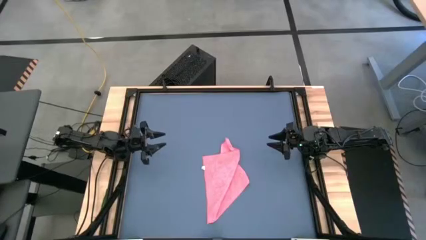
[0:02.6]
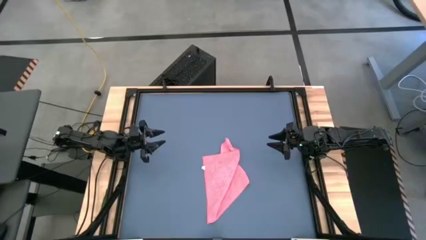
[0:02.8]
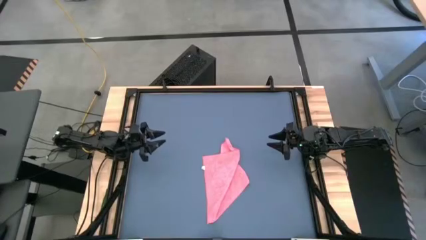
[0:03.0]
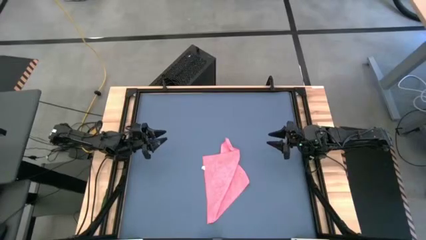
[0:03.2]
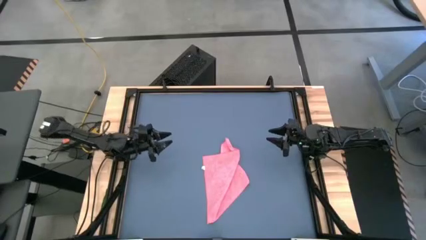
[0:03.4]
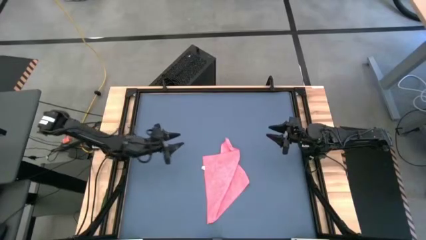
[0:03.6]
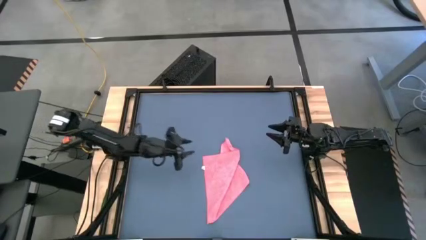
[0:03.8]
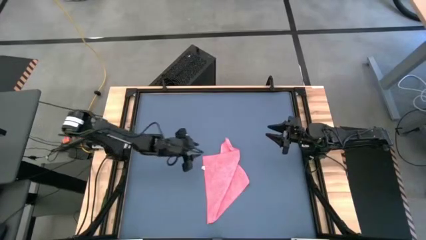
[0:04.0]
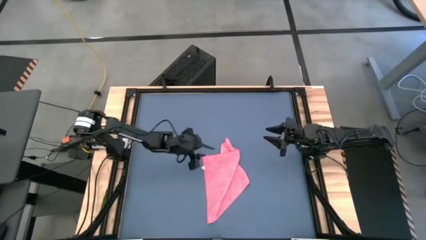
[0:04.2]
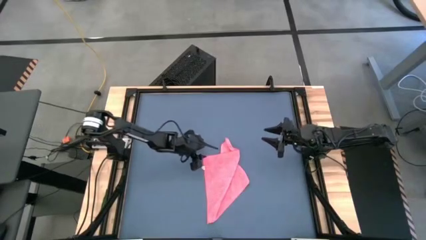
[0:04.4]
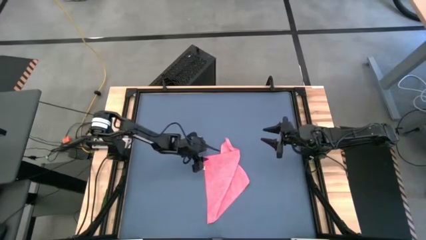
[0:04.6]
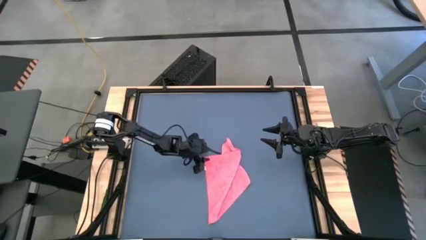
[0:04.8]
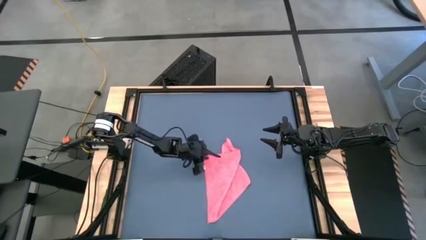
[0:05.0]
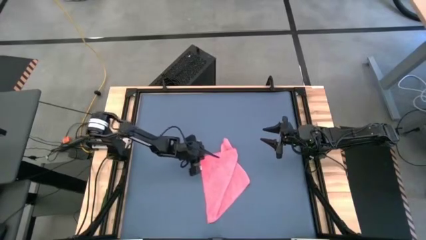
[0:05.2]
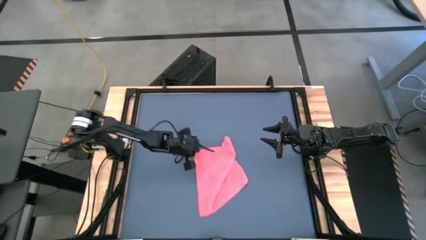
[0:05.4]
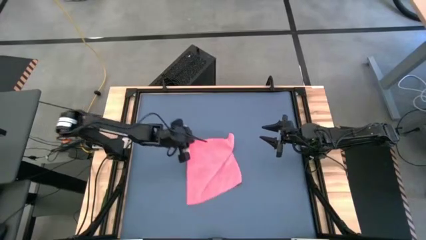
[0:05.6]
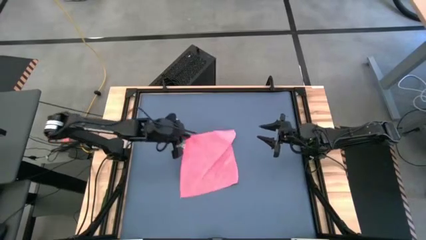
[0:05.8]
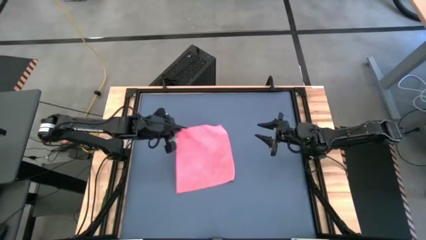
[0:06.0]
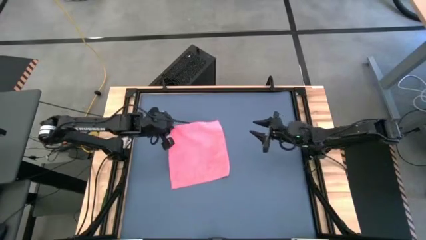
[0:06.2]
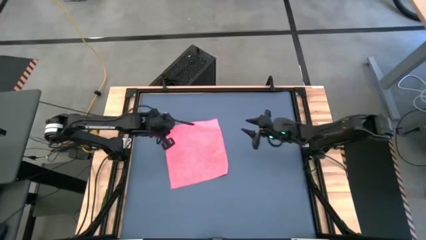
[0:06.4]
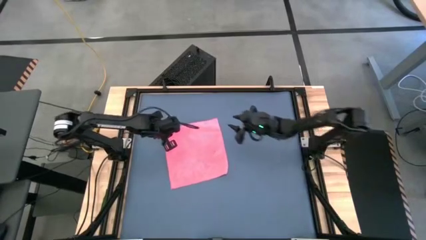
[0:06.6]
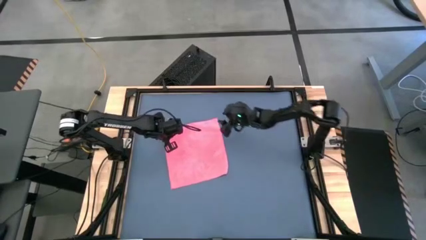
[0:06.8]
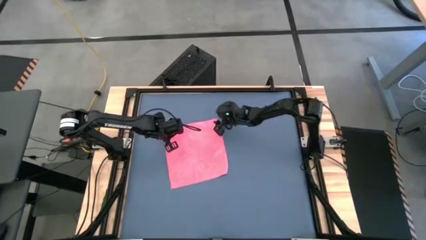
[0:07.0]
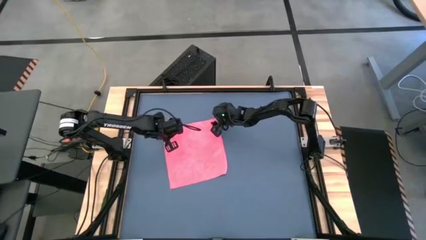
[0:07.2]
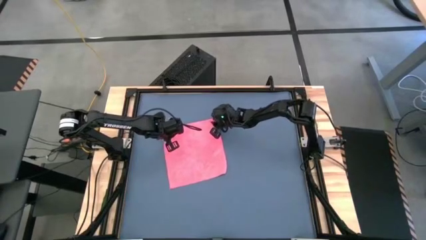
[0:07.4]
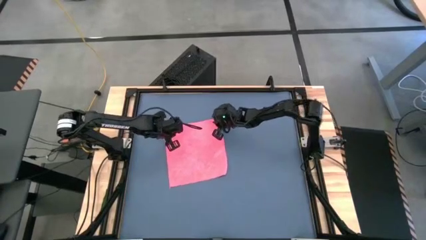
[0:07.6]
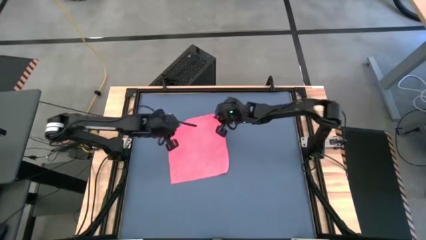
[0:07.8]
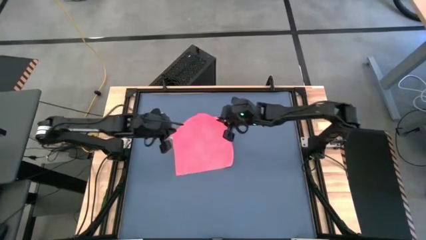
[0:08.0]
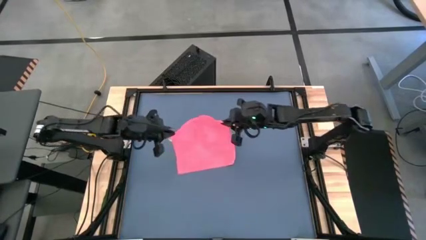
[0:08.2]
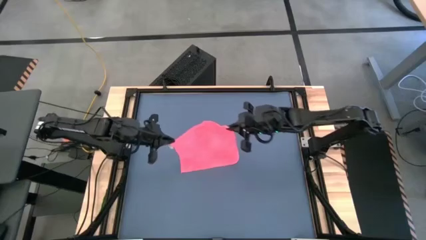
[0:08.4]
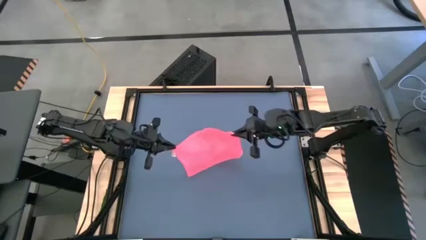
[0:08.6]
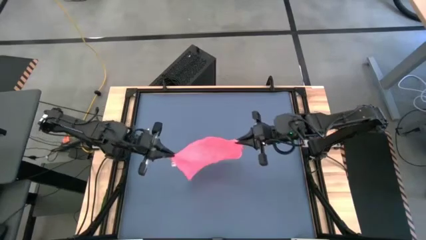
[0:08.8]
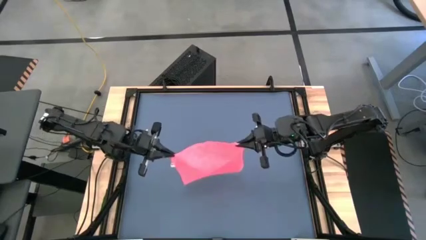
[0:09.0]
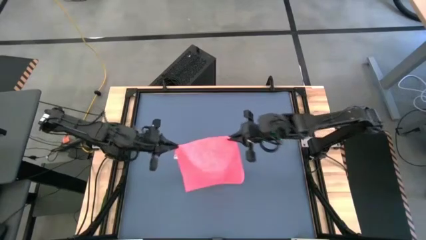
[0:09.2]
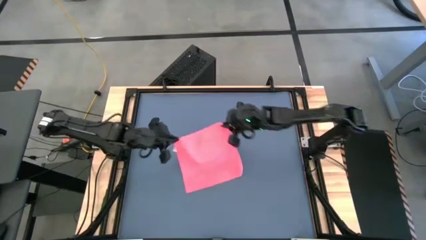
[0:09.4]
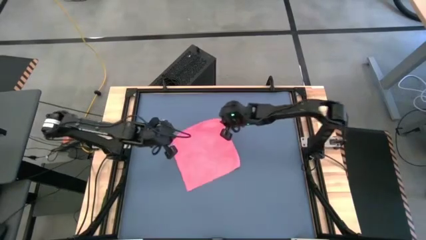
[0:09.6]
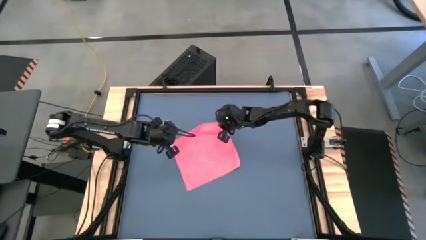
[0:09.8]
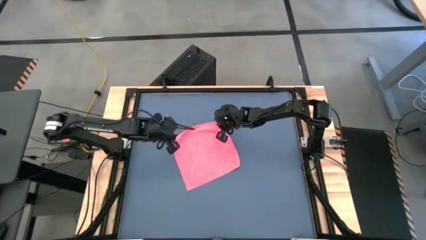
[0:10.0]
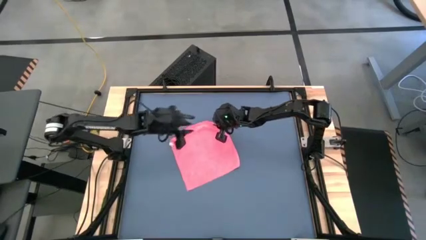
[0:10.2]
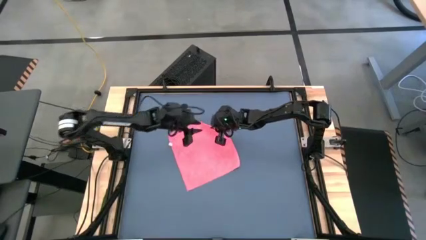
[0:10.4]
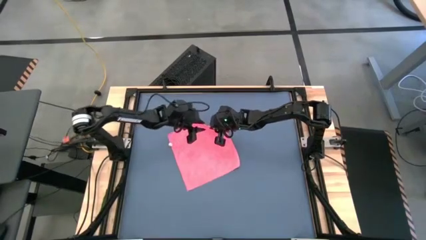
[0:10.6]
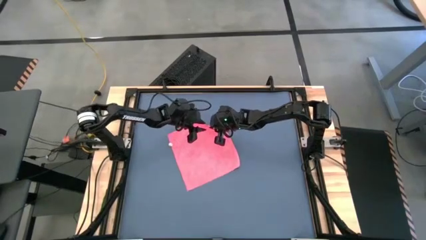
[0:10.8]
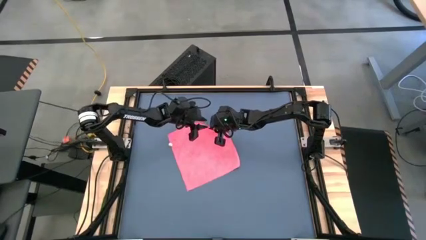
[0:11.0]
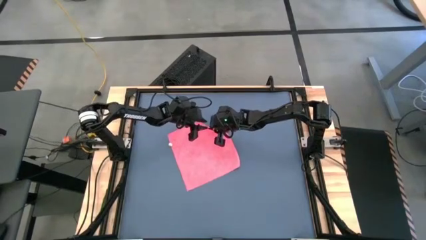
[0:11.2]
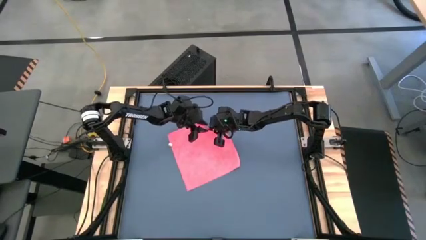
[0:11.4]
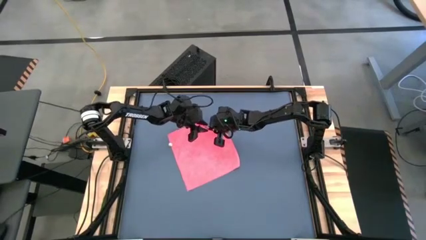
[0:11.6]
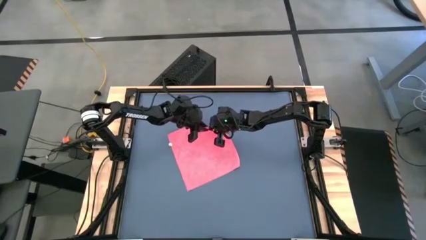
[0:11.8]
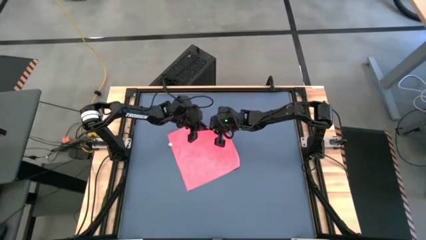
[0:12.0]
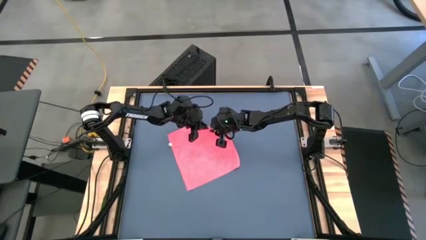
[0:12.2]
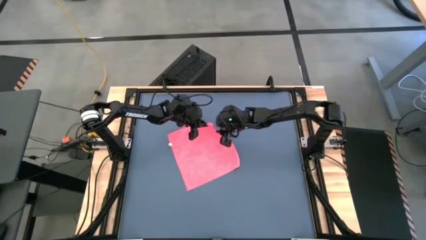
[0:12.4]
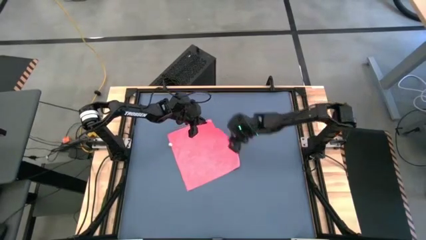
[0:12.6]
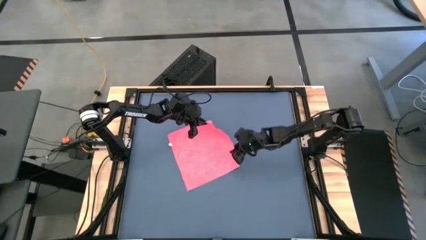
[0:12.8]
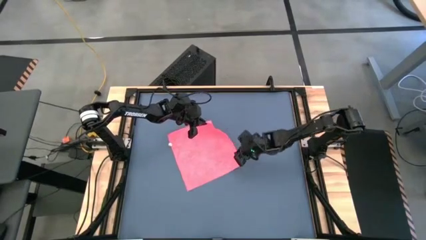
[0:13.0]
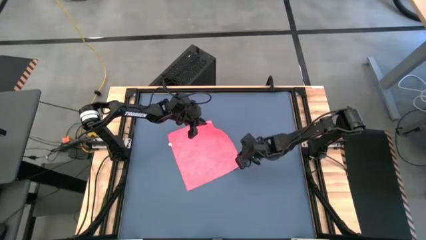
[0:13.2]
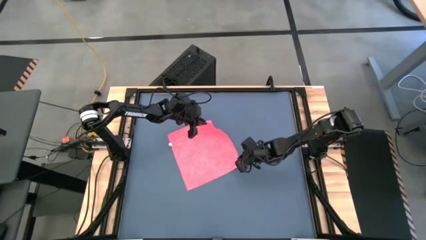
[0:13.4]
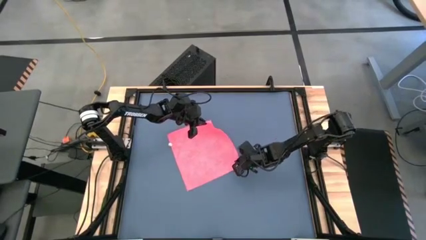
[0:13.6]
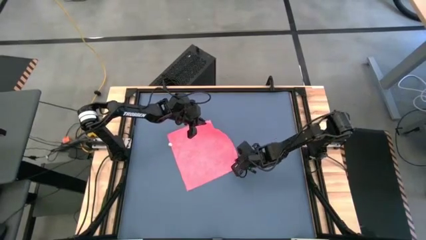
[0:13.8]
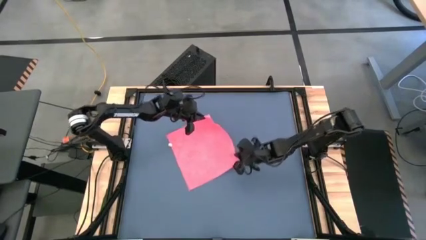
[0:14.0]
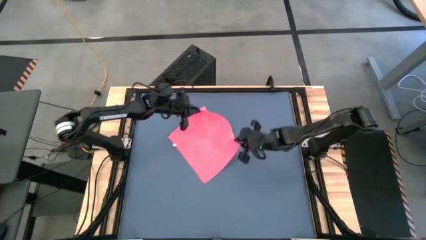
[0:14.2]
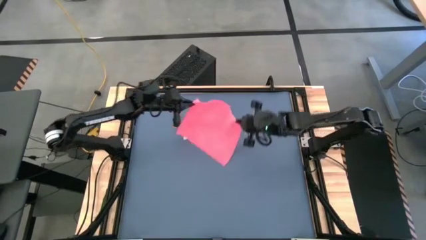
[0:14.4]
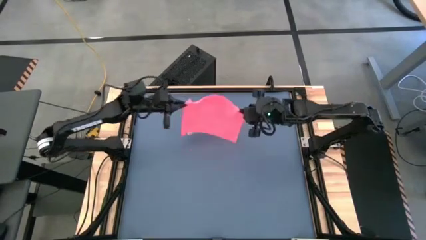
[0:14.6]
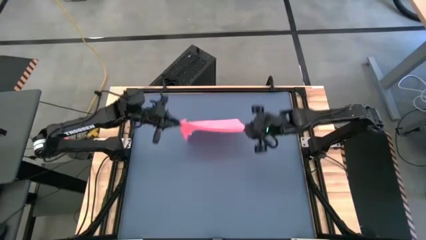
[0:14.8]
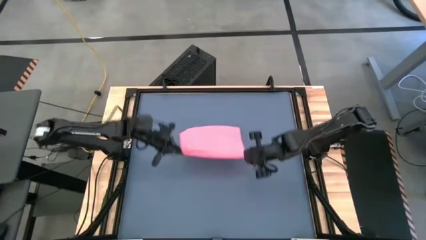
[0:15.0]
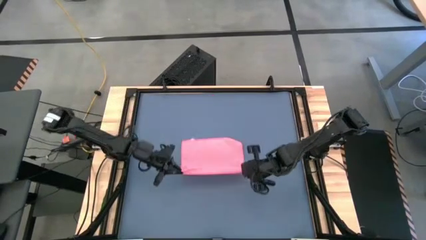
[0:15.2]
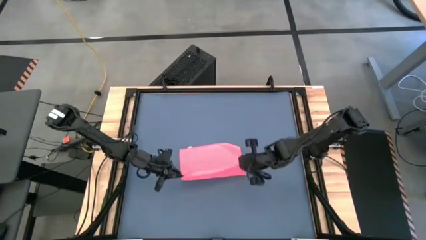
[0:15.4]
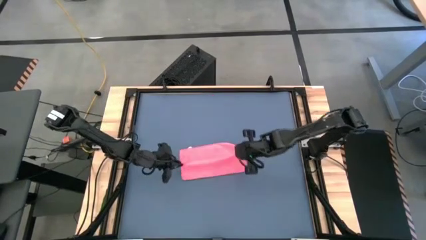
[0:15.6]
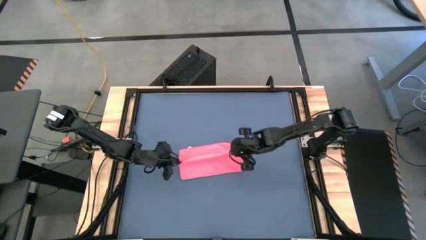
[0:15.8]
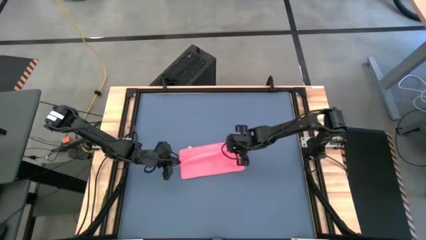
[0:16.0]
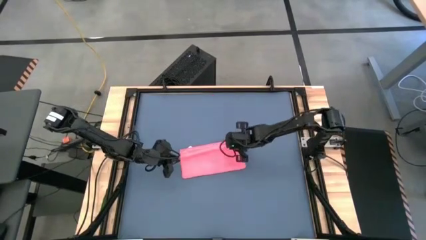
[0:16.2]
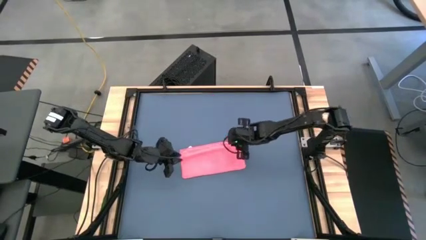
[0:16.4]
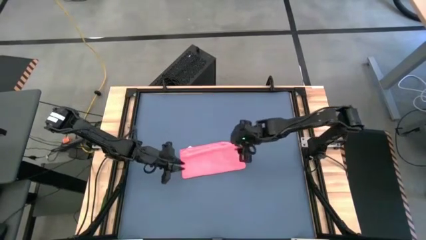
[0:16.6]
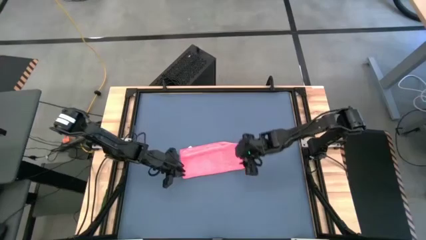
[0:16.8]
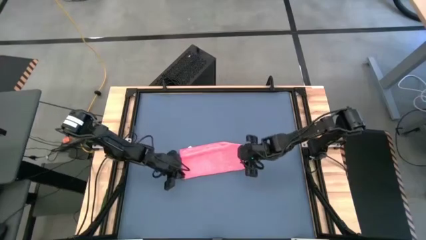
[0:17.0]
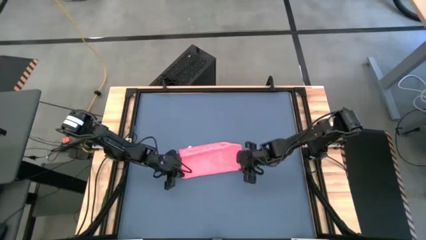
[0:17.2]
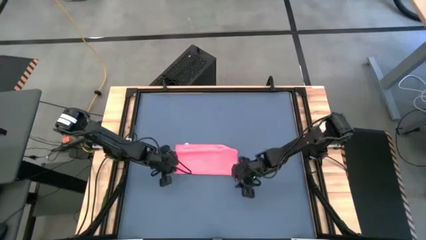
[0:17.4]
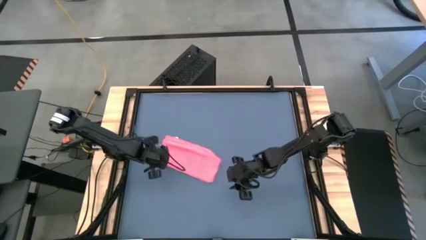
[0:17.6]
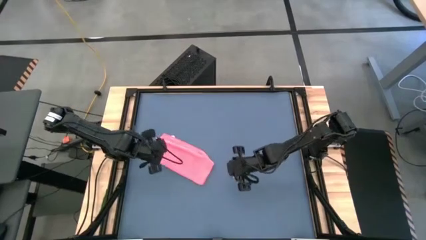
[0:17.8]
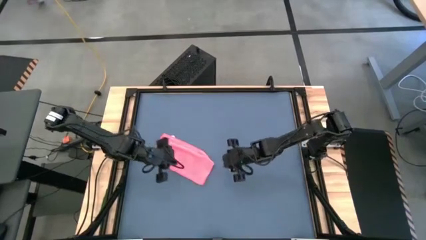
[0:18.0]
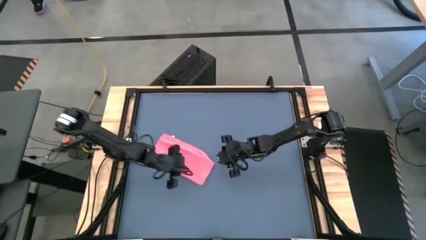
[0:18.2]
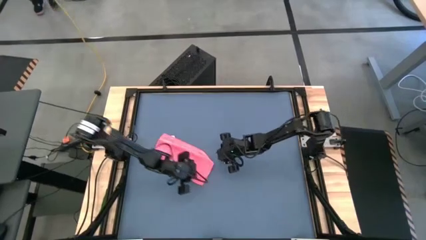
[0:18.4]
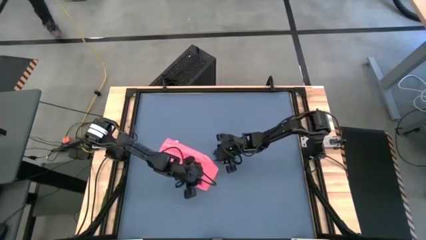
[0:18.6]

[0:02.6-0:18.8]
Task: Roll towel
Fold the microfiber towel
